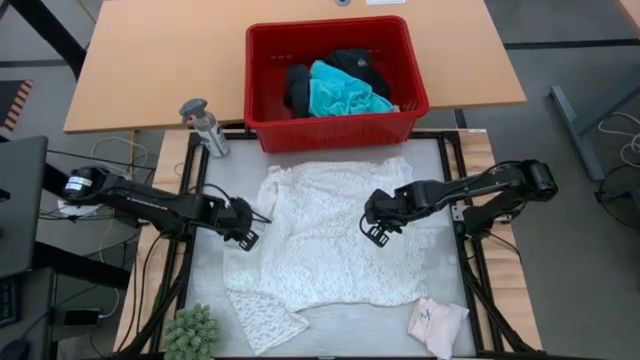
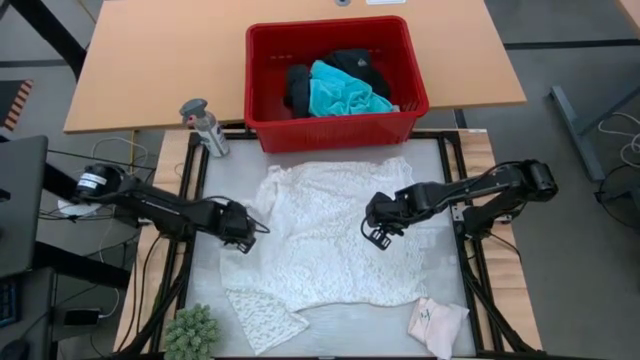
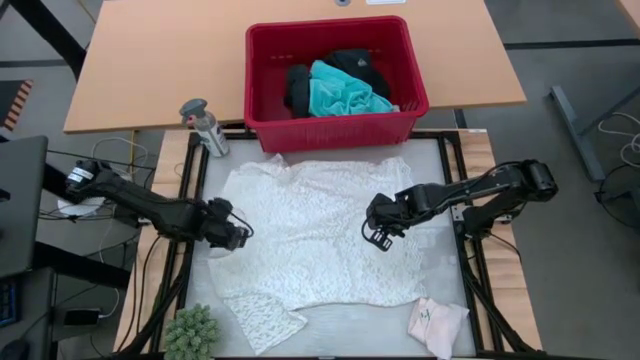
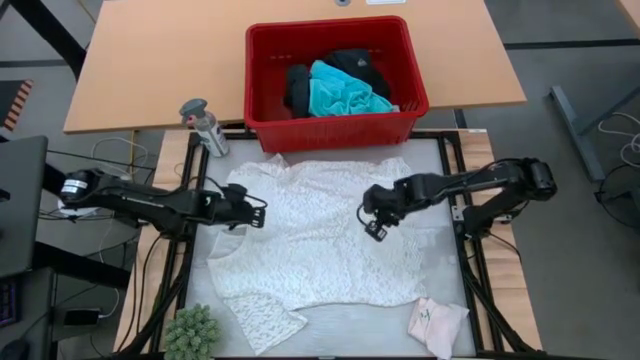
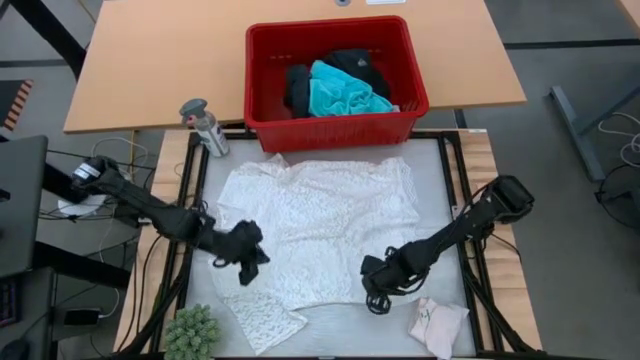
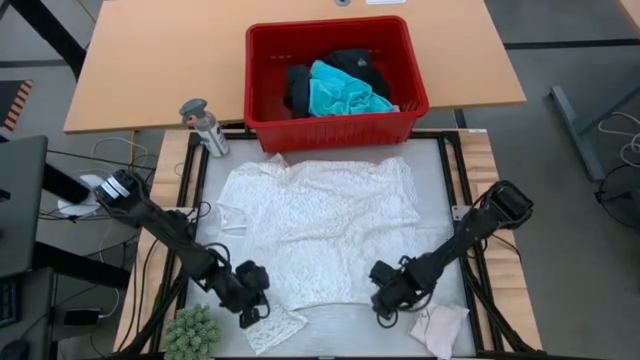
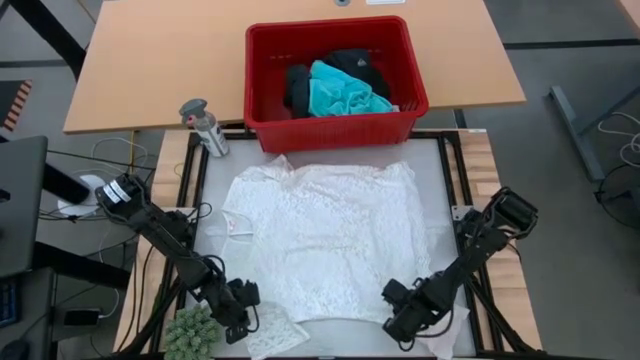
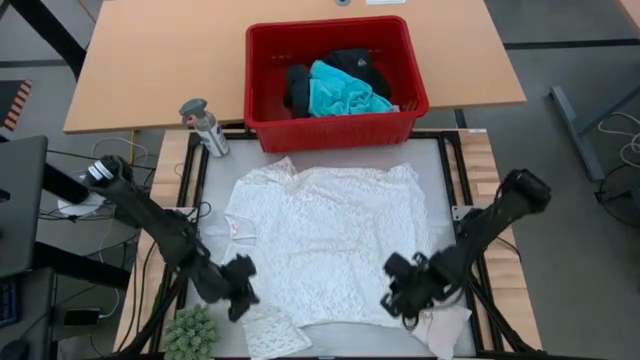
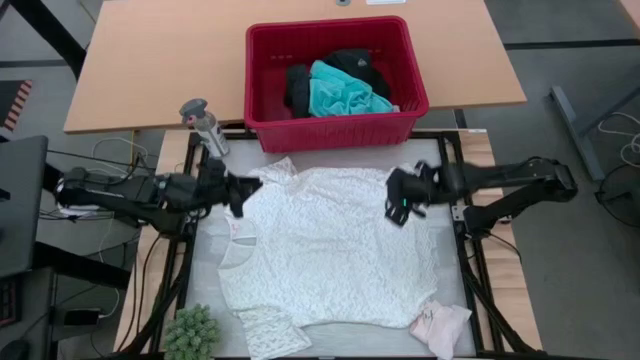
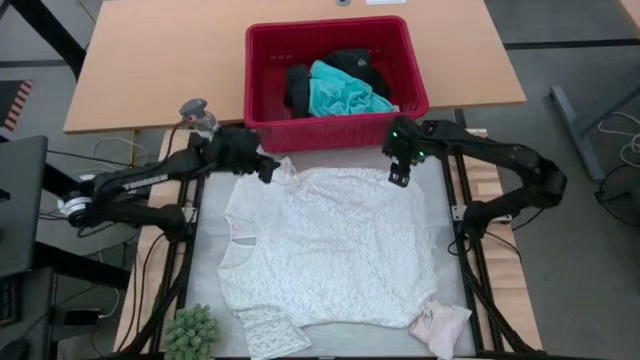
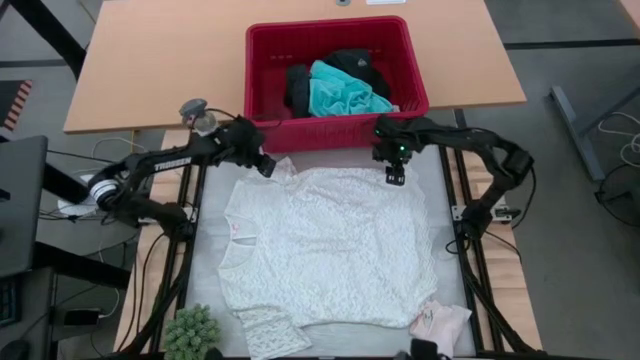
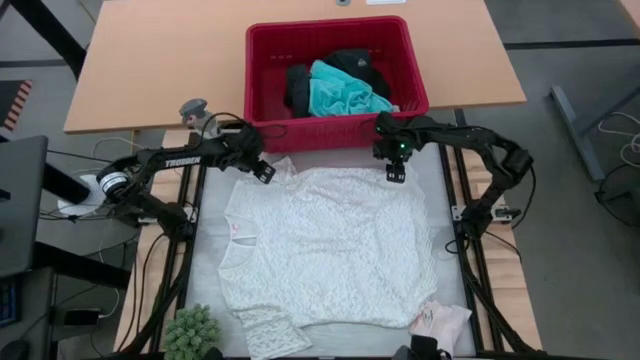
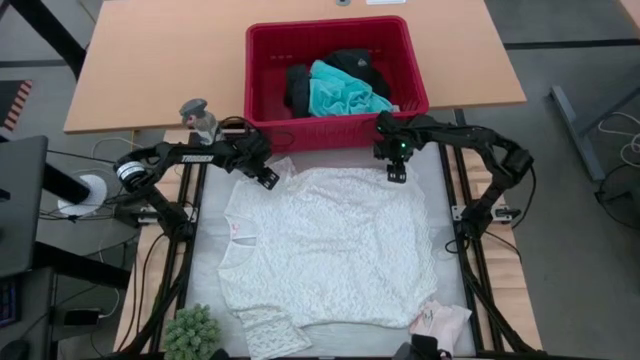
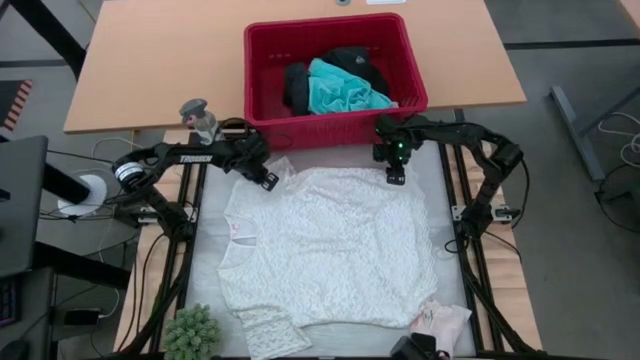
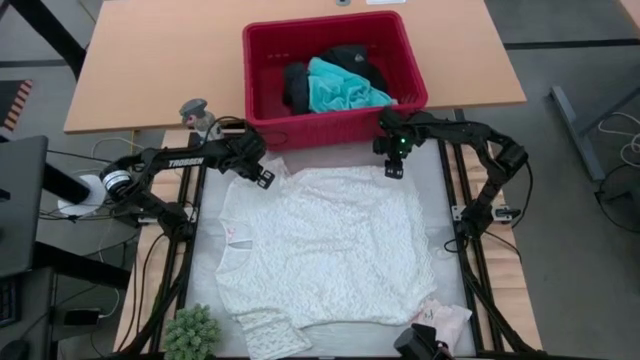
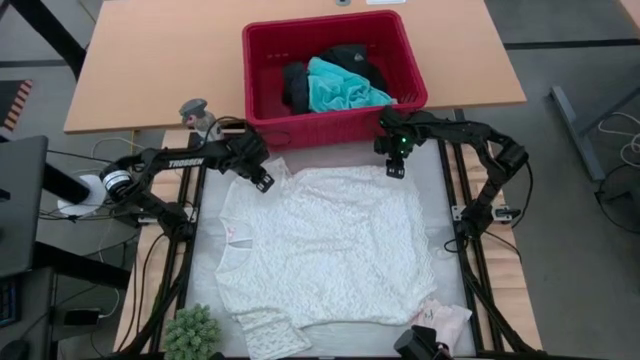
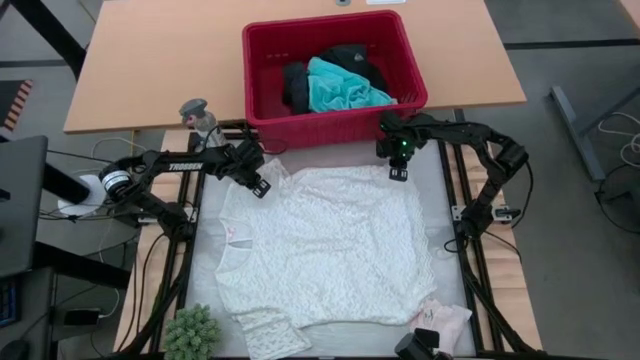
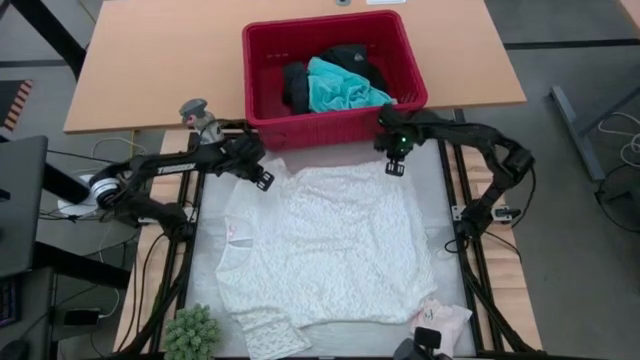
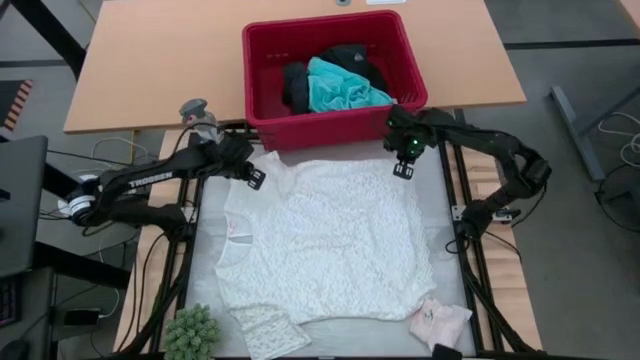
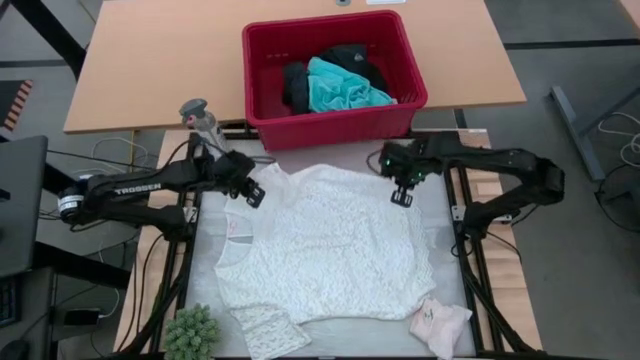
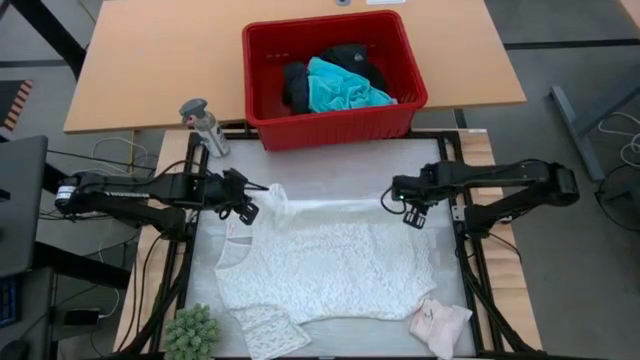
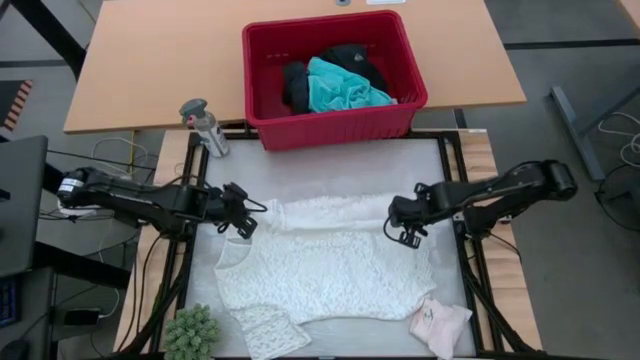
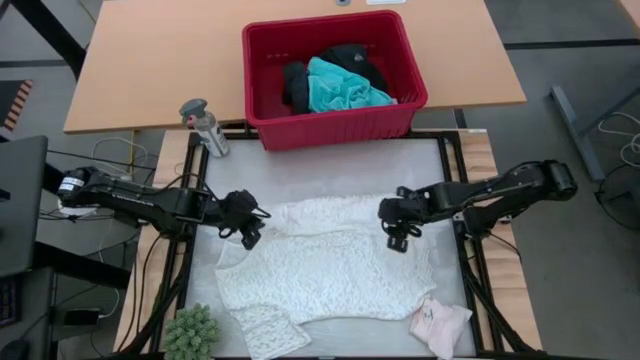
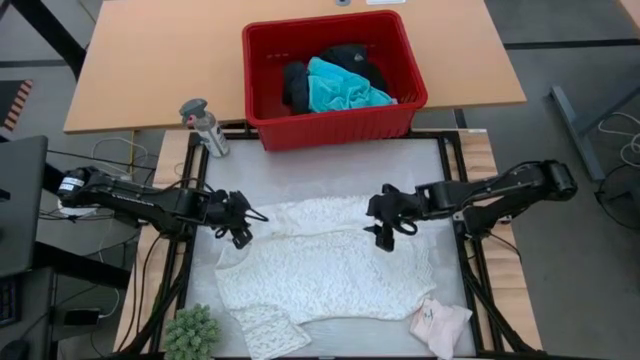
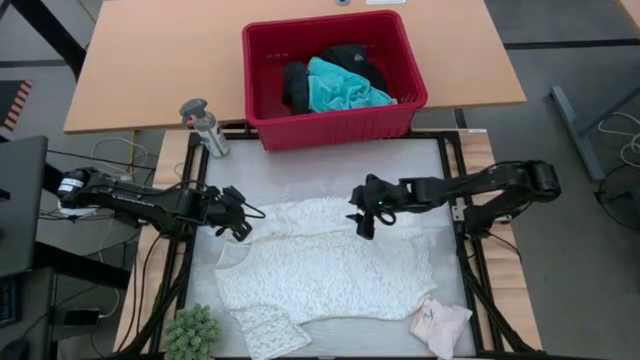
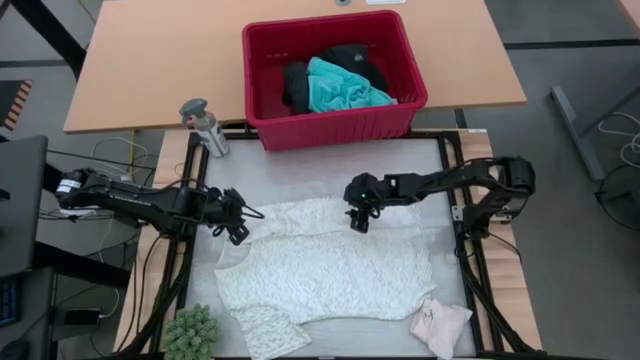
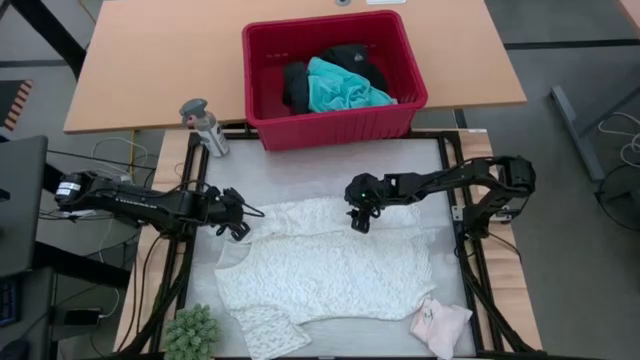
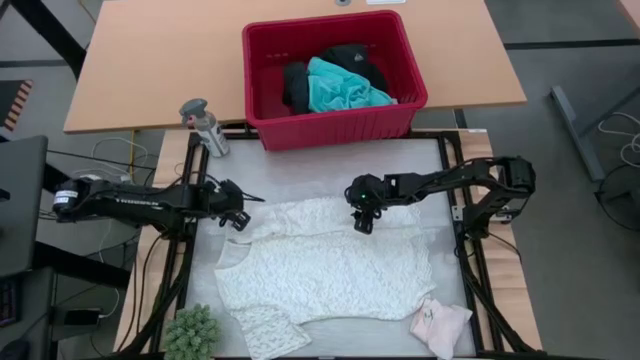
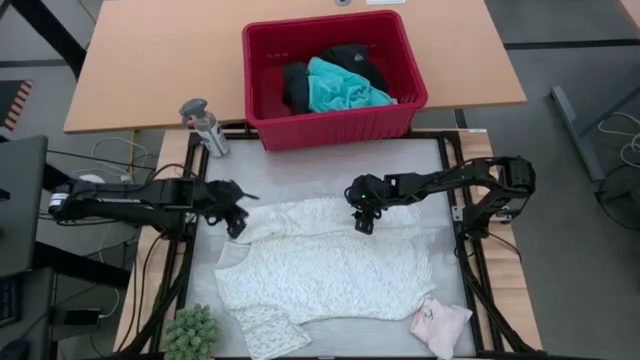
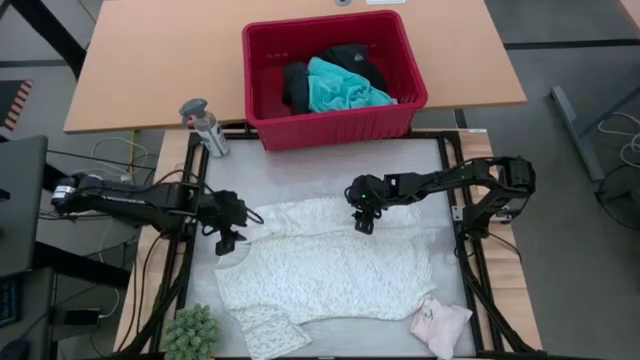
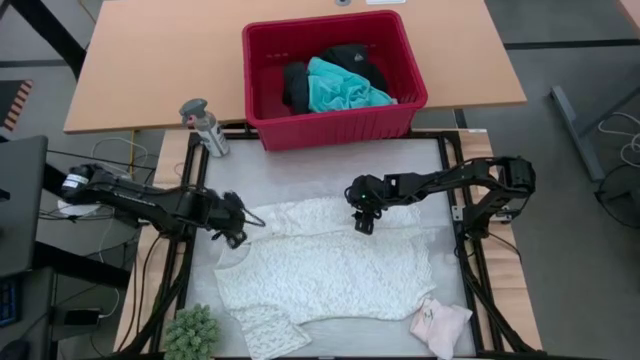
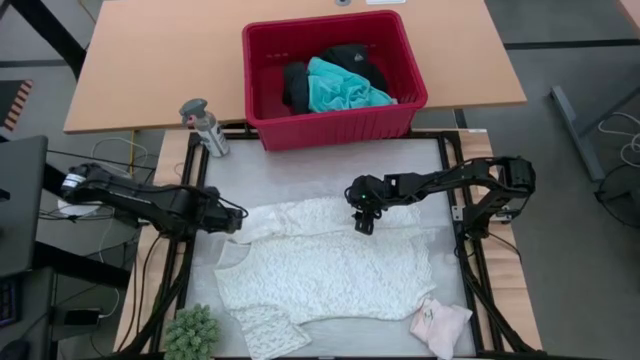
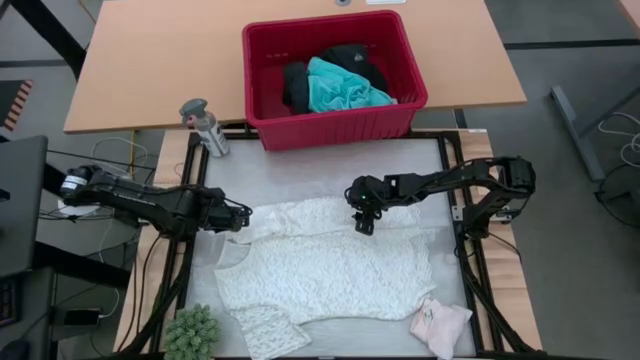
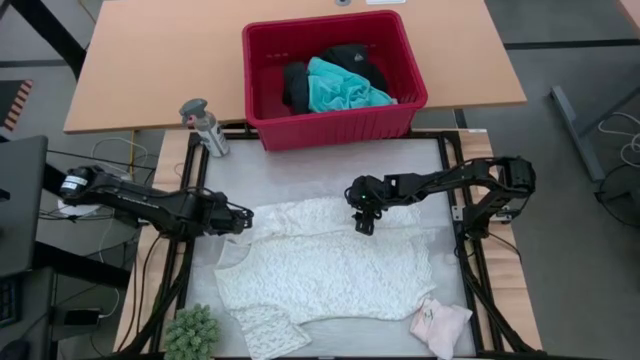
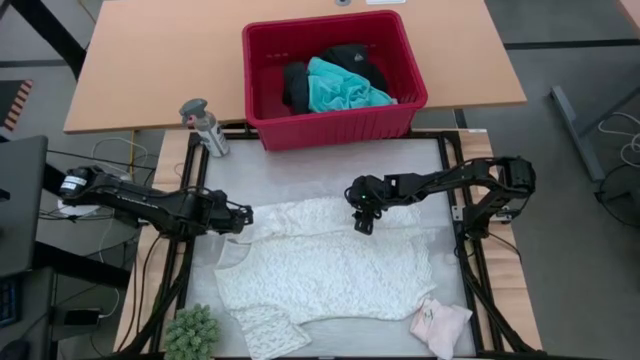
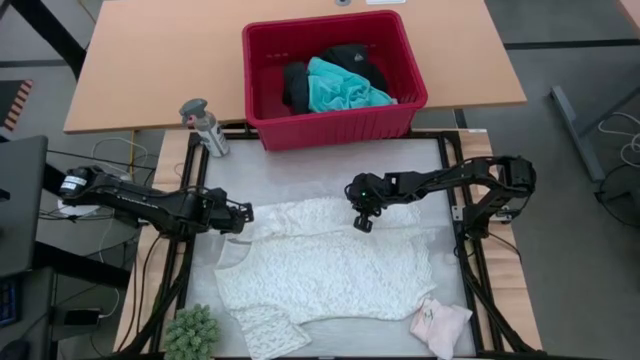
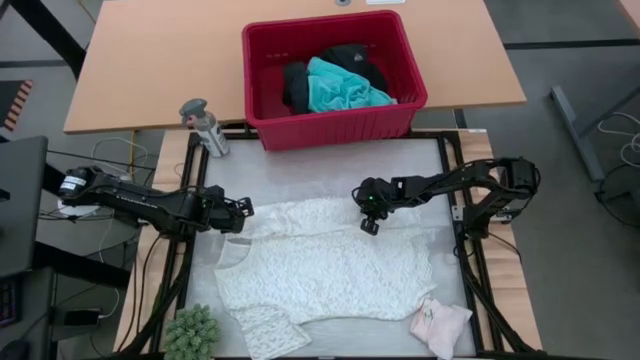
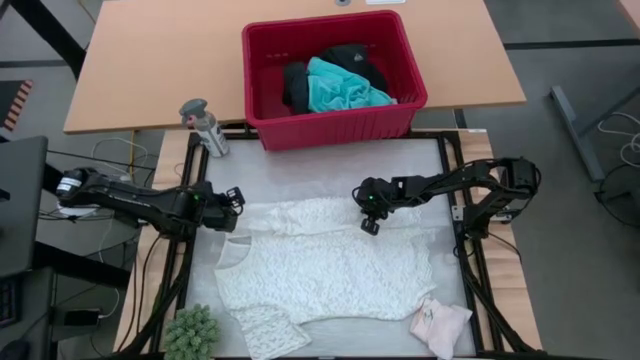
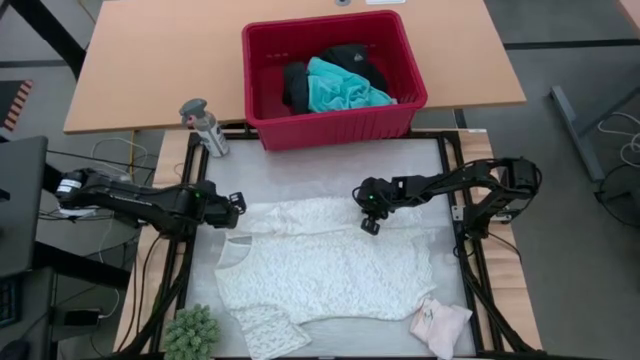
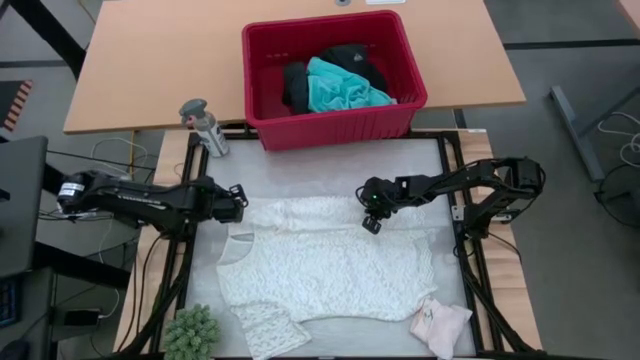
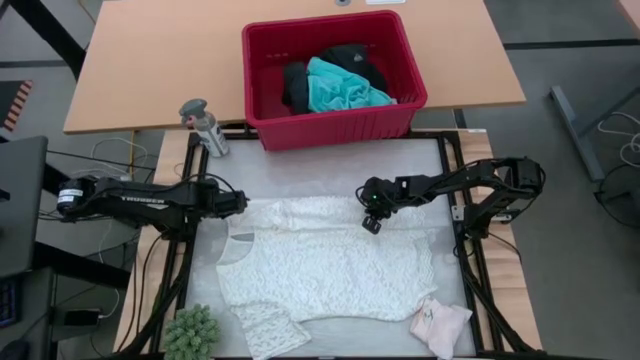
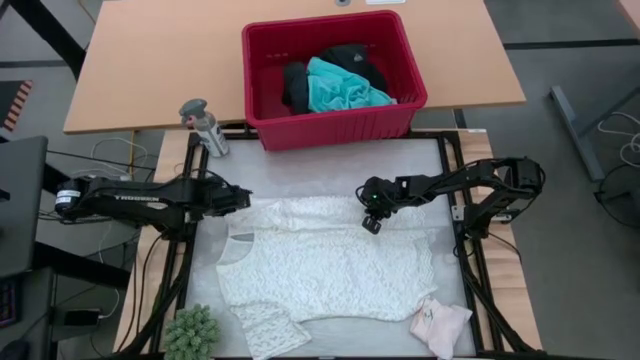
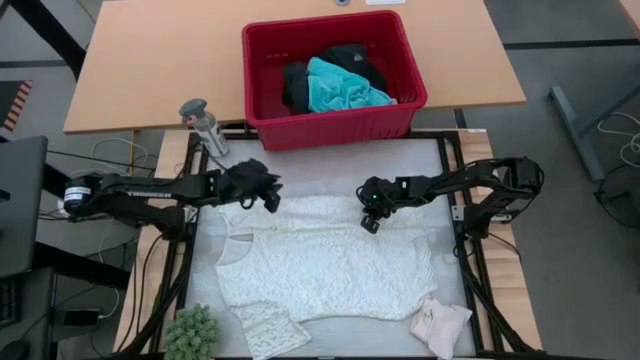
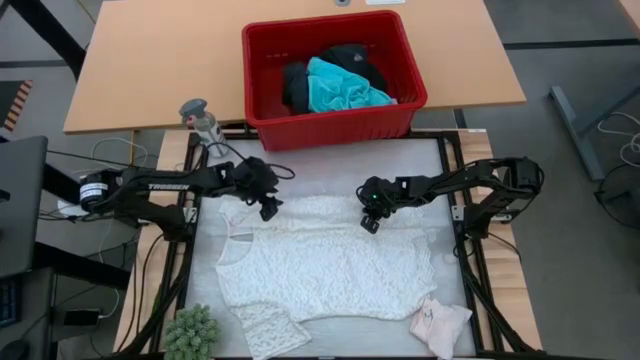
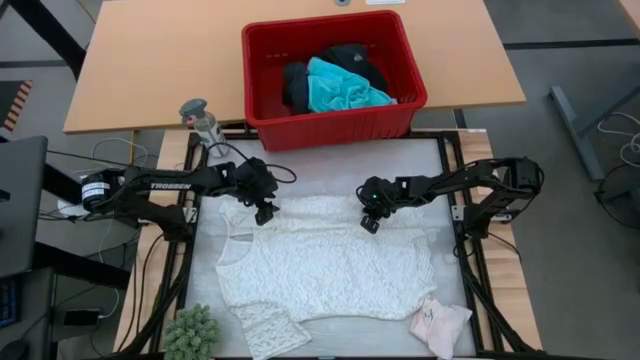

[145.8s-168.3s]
Task: Fold Laundry from Bin
Fold the white blouse
